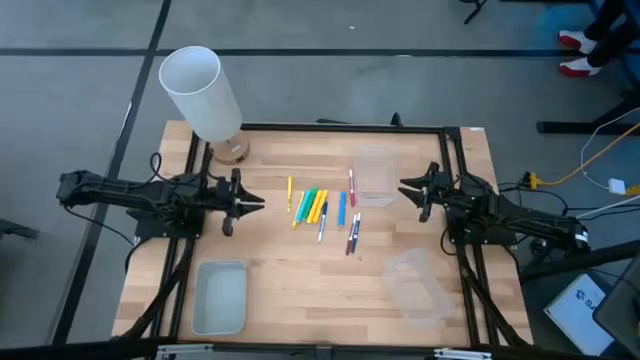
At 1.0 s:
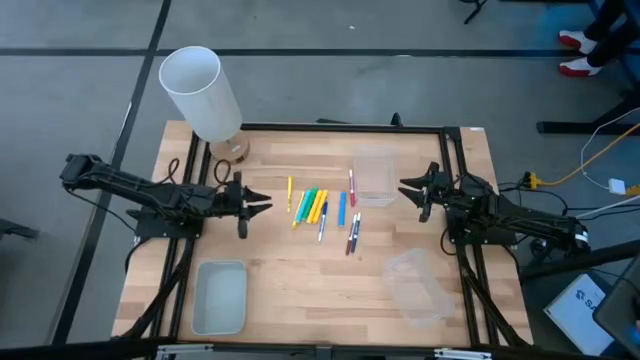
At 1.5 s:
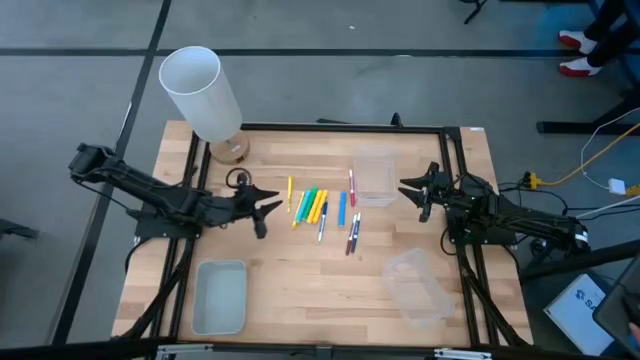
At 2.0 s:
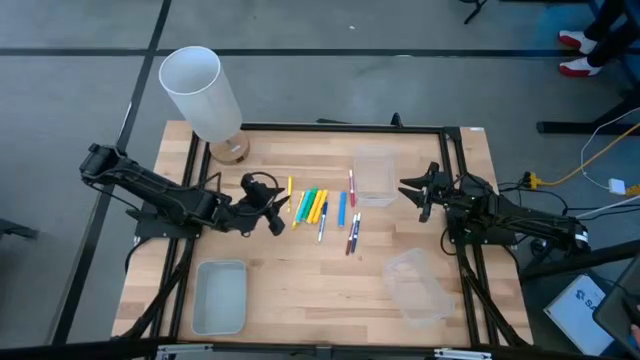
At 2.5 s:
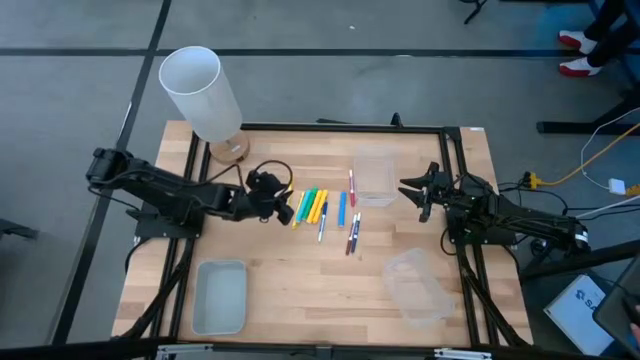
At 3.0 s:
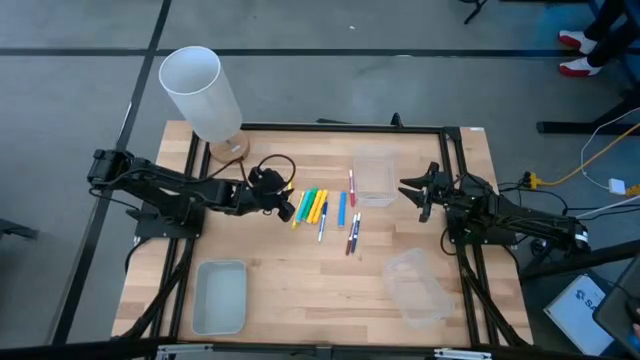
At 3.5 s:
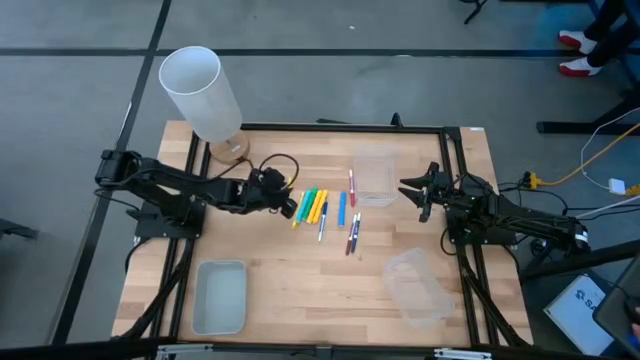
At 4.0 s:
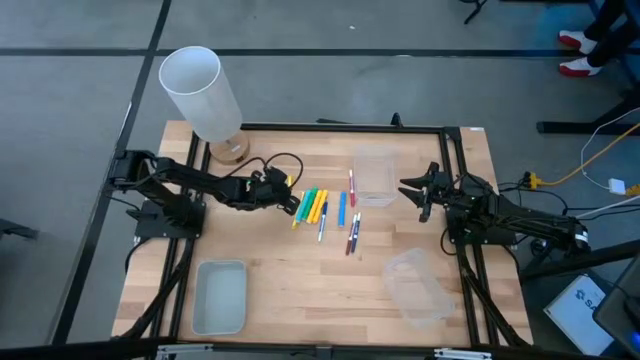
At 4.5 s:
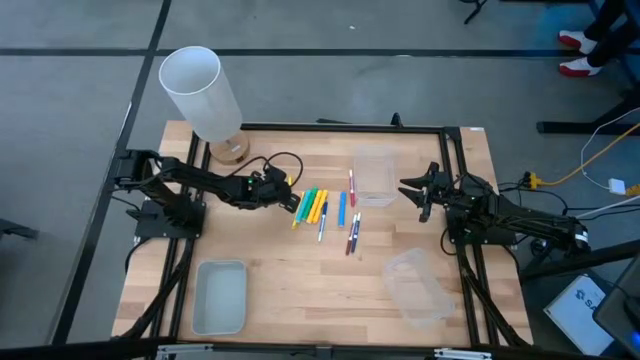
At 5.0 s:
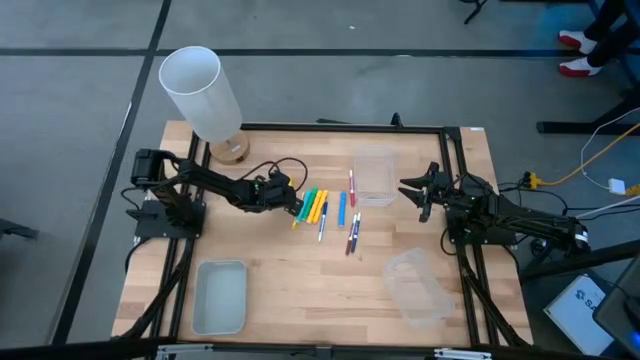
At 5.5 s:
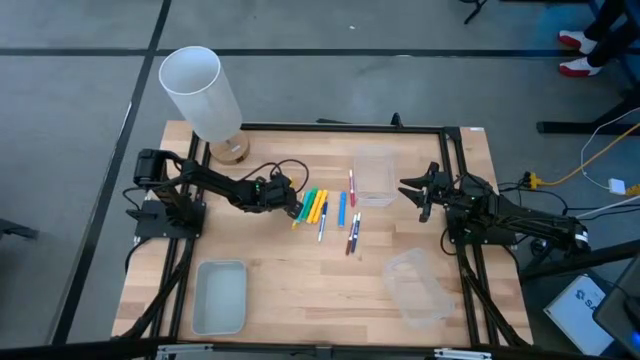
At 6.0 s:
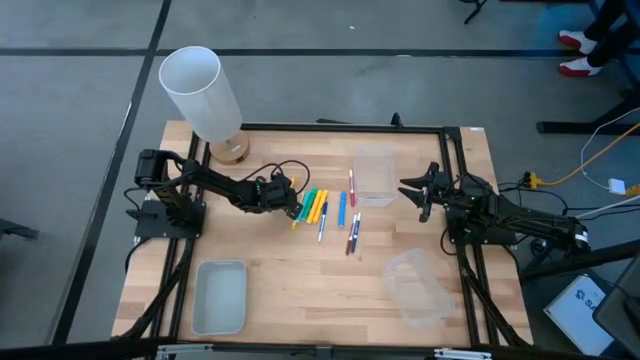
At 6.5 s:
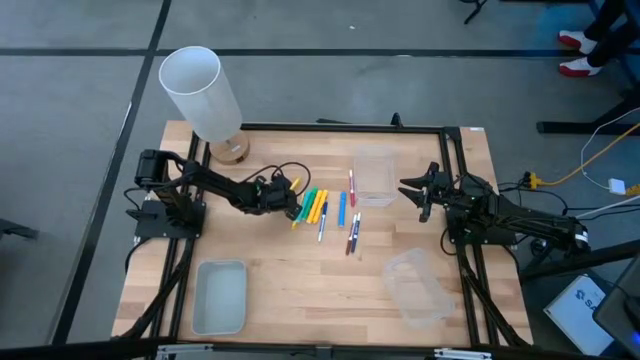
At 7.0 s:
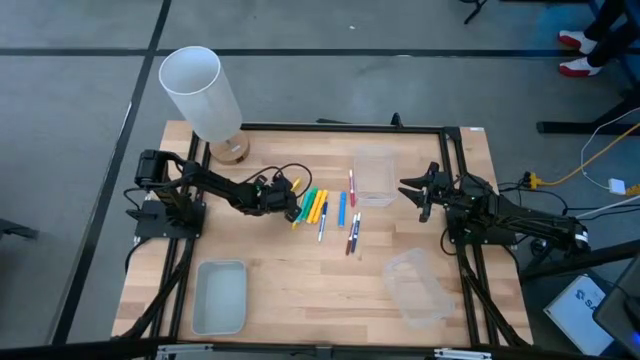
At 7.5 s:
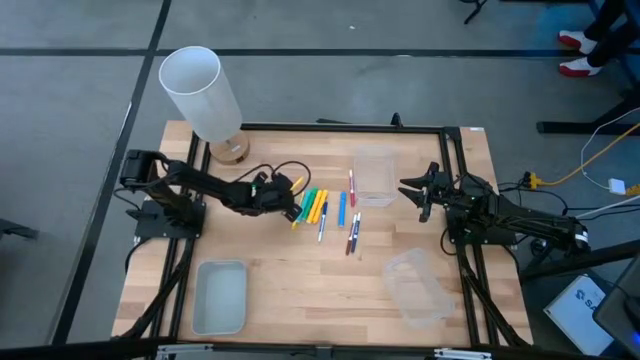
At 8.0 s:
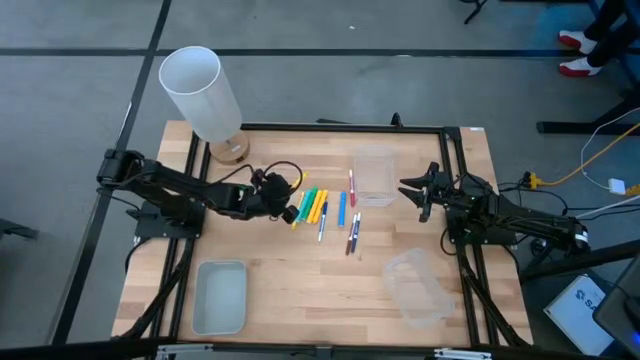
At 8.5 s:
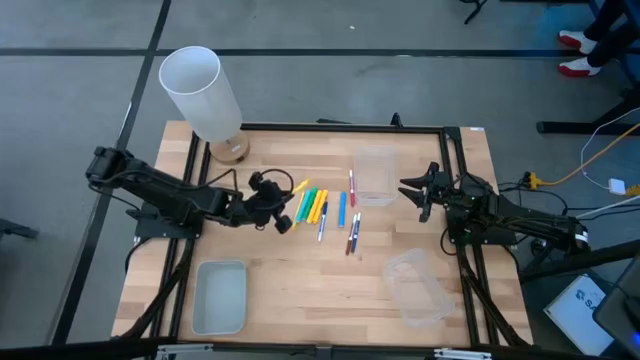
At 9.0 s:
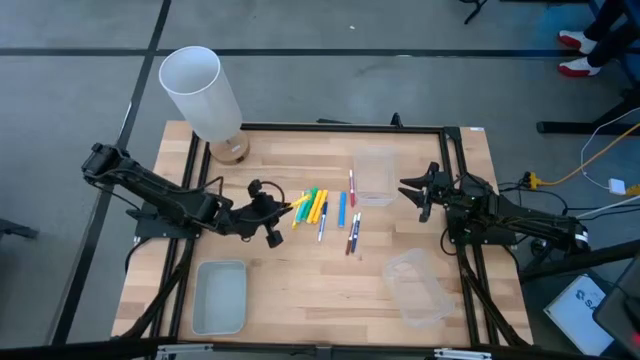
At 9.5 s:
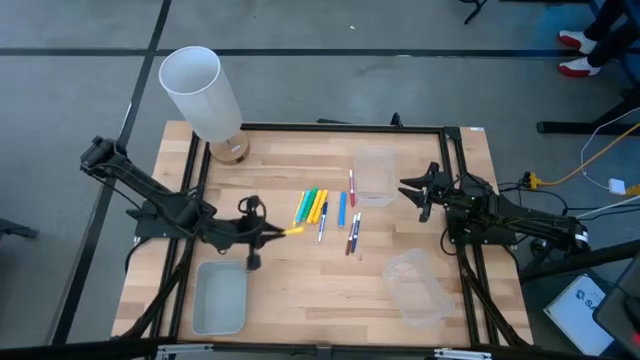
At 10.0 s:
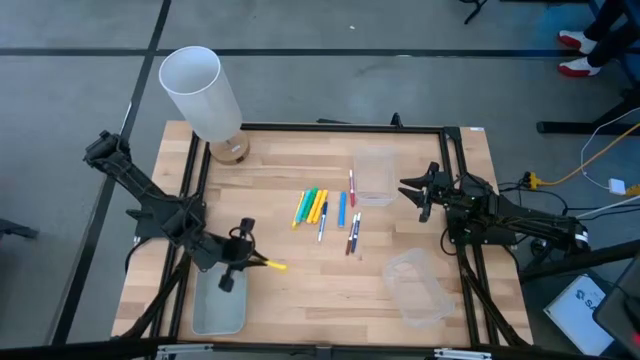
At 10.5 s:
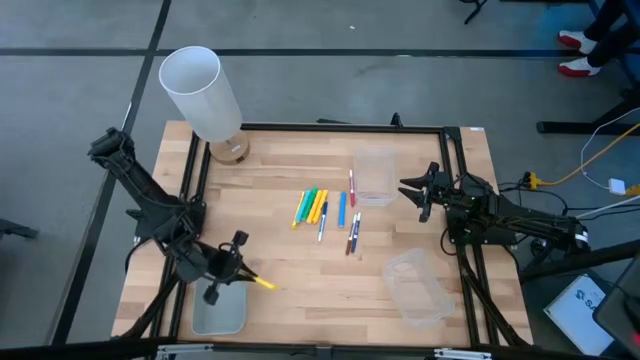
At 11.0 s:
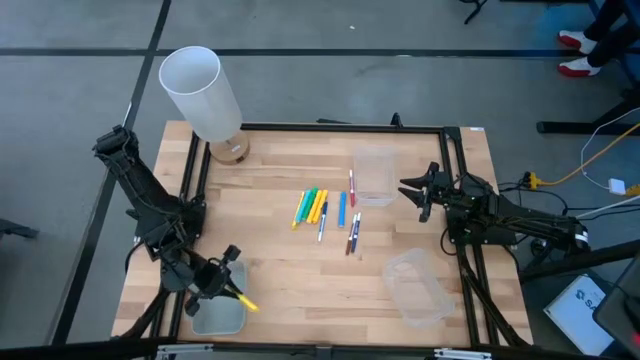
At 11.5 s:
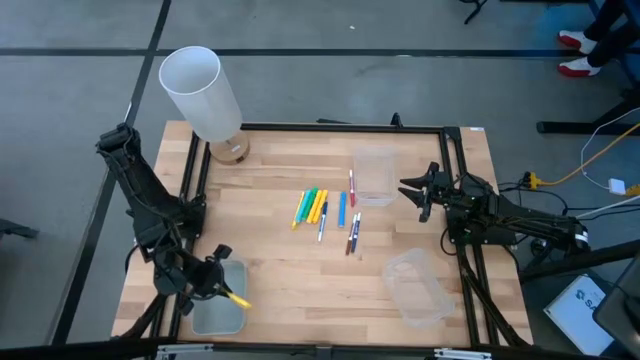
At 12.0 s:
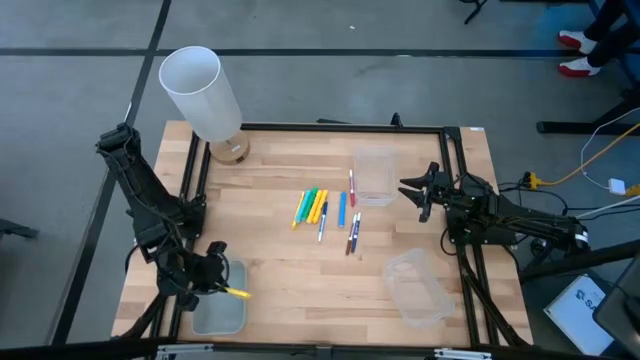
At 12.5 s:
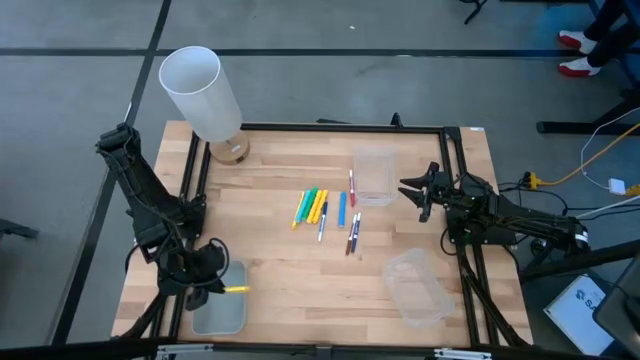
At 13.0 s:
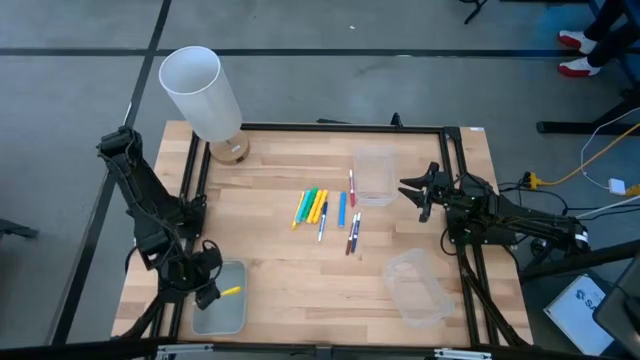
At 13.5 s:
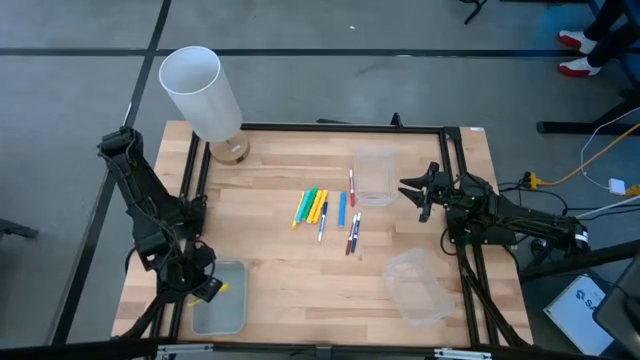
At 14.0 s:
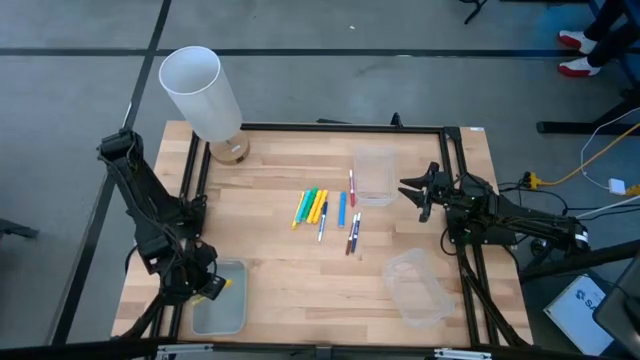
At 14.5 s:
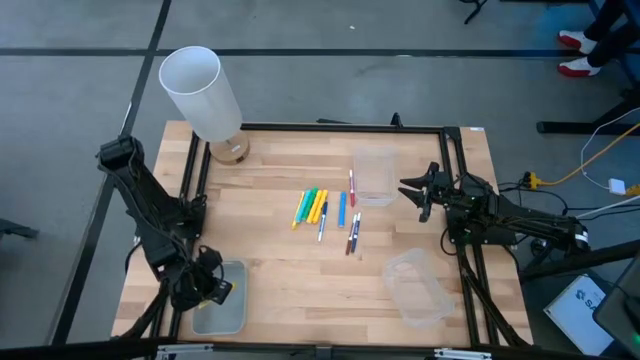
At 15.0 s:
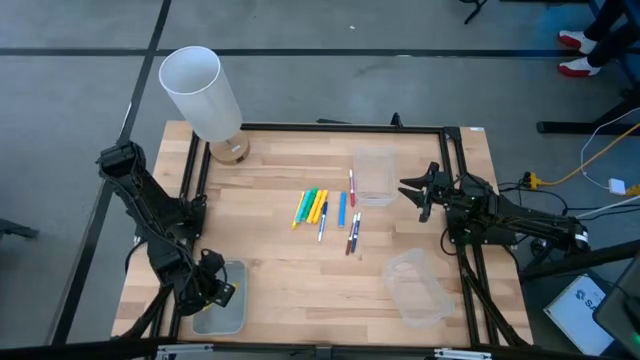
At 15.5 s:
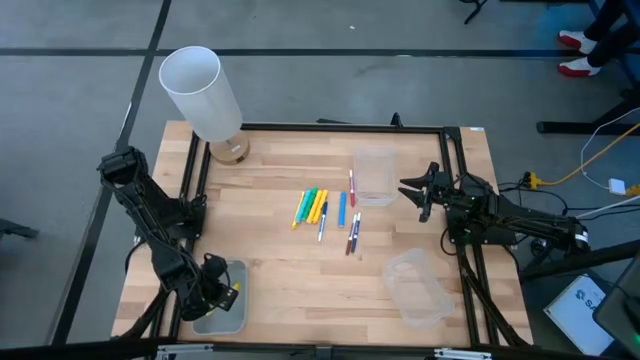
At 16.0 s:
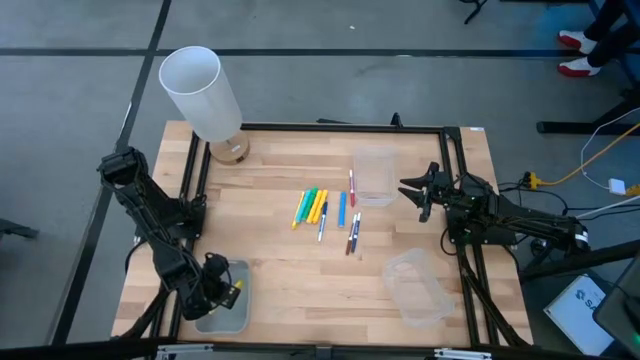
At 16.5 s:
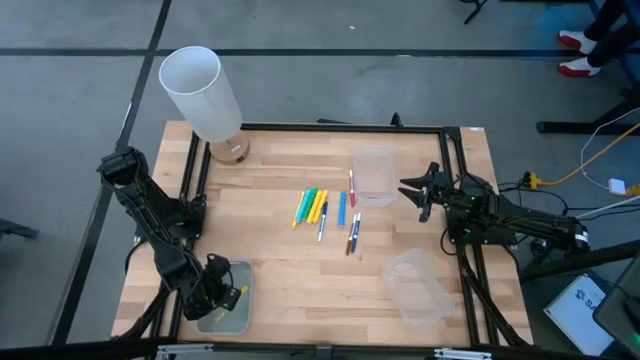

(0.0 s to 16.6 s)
Task: Pick & Place Markers
Put the left yellow pen into the gray bin
